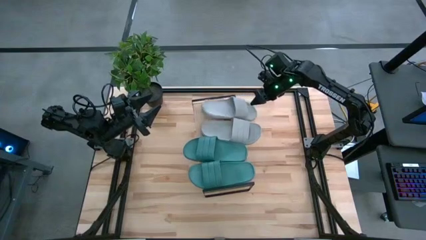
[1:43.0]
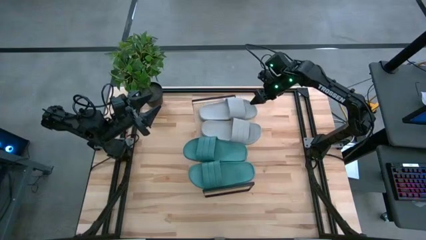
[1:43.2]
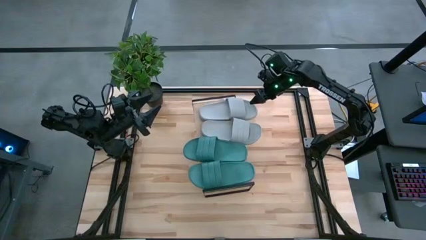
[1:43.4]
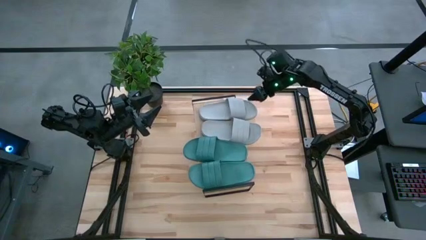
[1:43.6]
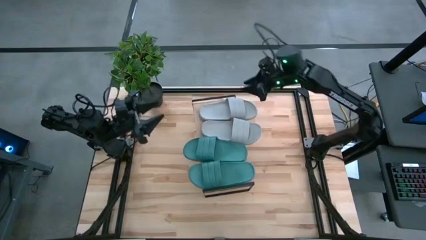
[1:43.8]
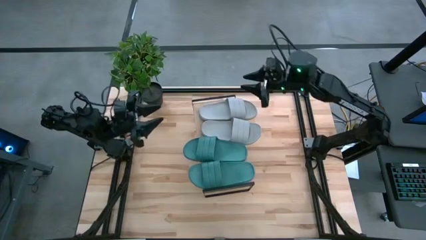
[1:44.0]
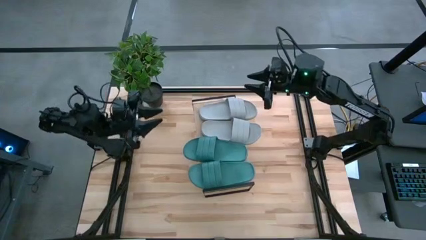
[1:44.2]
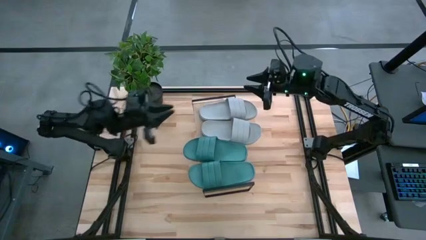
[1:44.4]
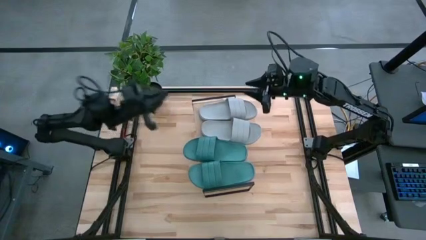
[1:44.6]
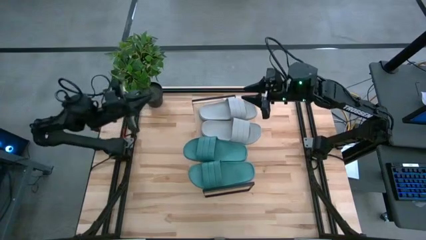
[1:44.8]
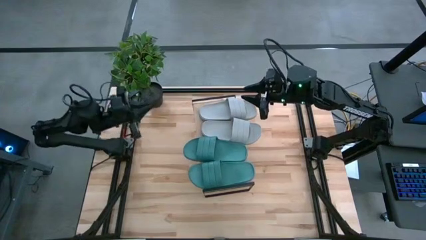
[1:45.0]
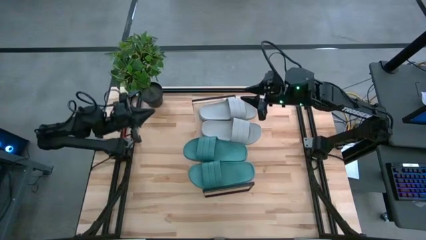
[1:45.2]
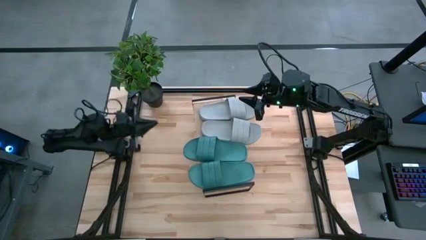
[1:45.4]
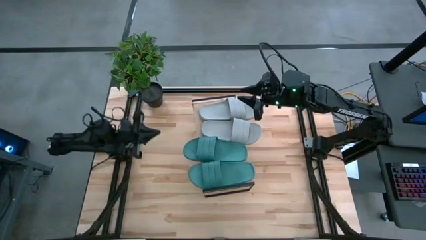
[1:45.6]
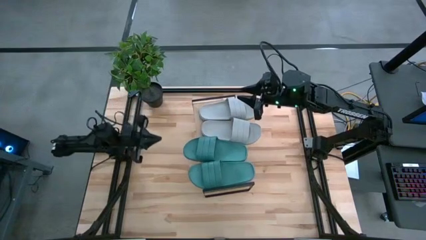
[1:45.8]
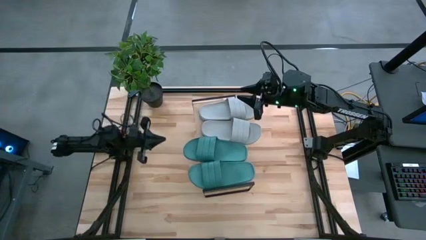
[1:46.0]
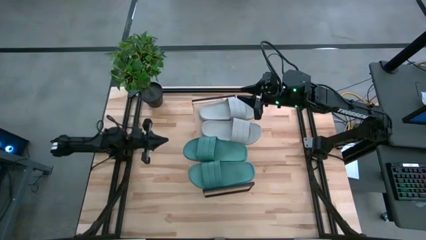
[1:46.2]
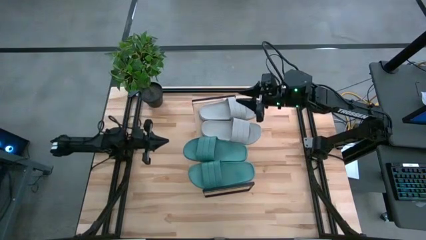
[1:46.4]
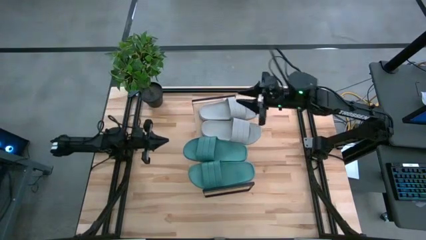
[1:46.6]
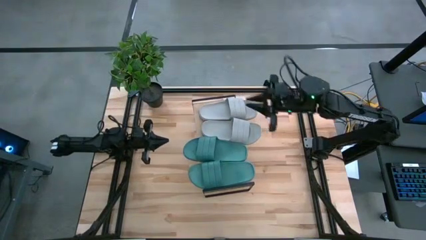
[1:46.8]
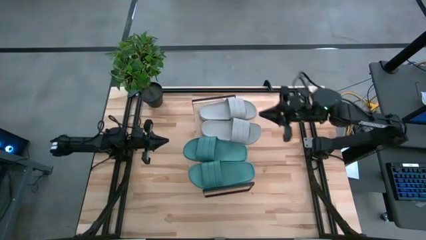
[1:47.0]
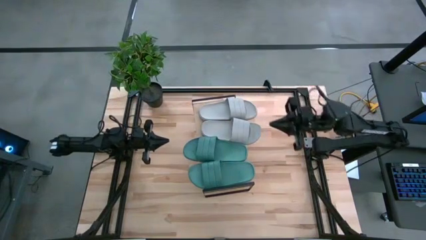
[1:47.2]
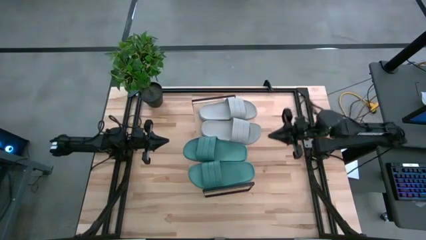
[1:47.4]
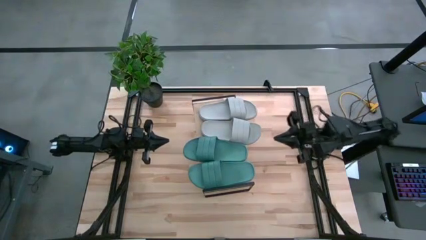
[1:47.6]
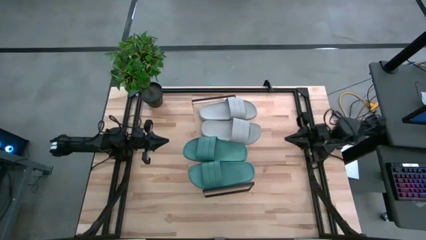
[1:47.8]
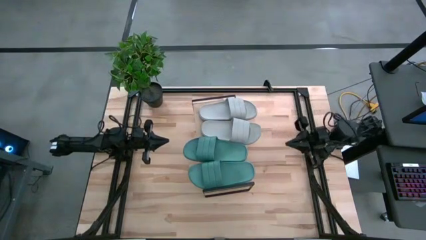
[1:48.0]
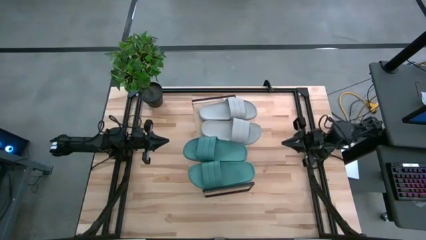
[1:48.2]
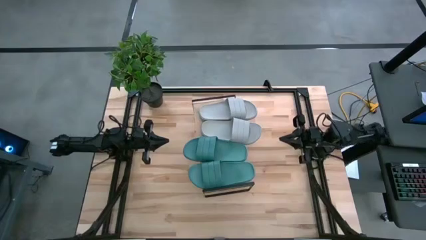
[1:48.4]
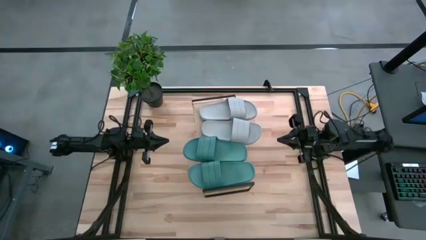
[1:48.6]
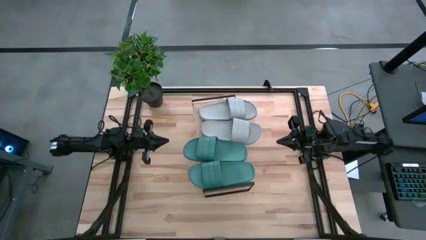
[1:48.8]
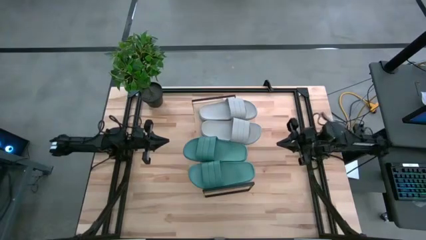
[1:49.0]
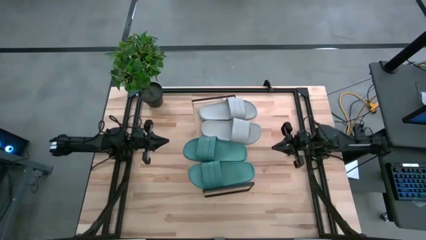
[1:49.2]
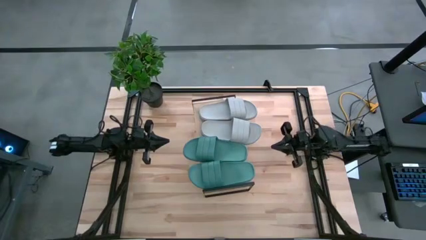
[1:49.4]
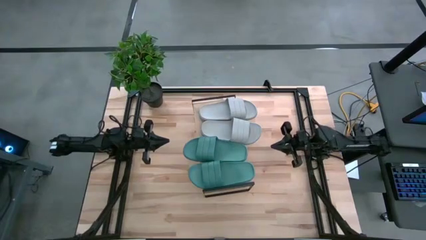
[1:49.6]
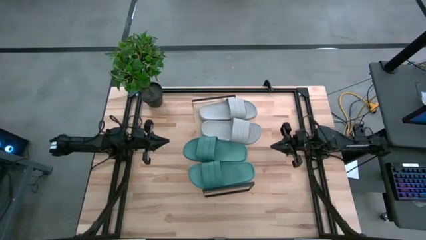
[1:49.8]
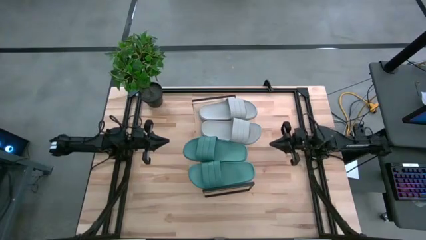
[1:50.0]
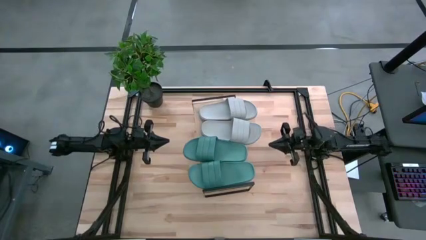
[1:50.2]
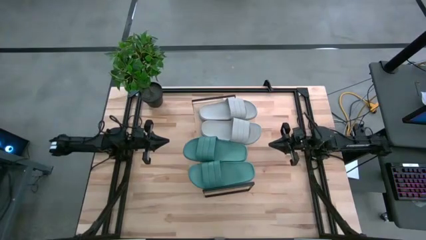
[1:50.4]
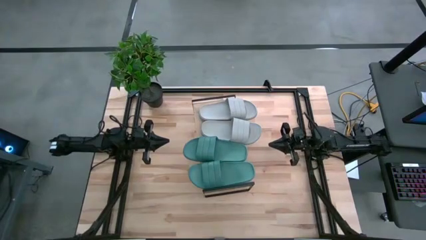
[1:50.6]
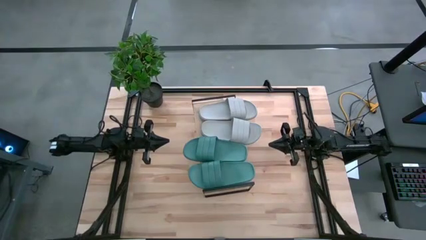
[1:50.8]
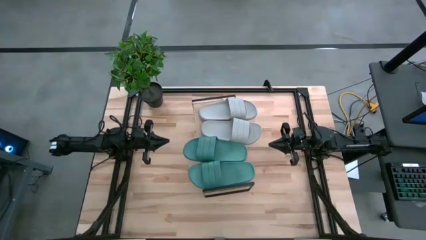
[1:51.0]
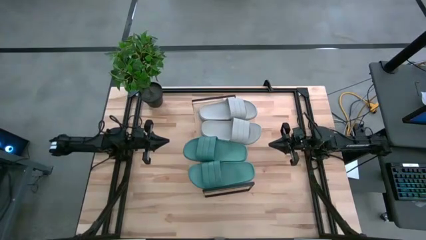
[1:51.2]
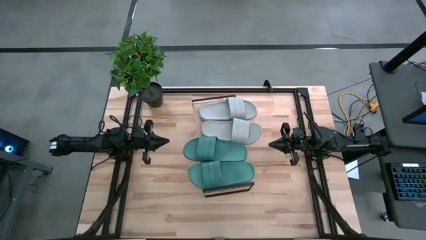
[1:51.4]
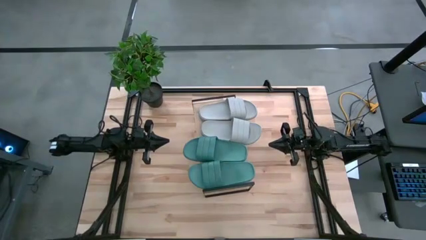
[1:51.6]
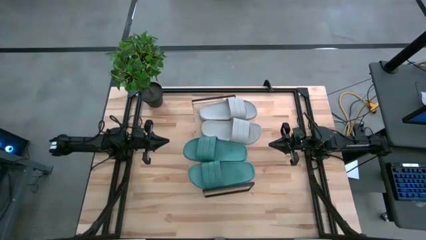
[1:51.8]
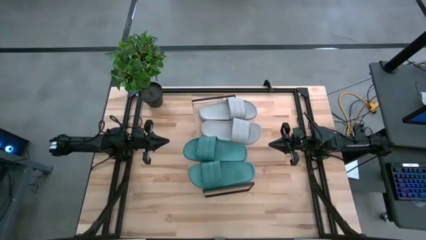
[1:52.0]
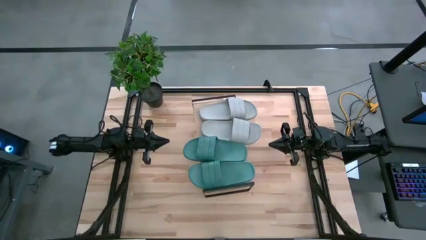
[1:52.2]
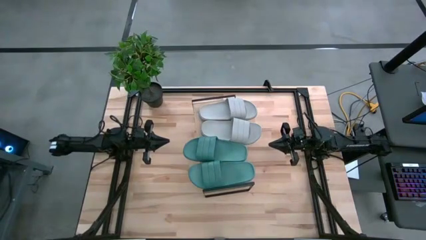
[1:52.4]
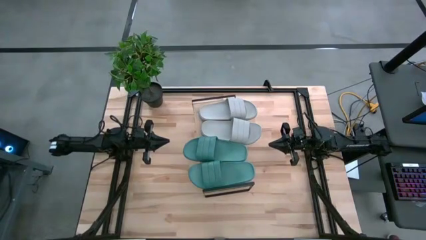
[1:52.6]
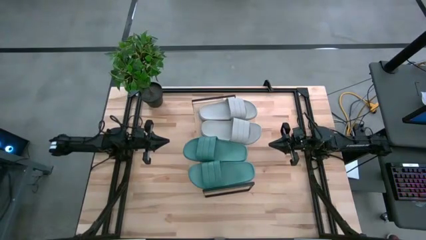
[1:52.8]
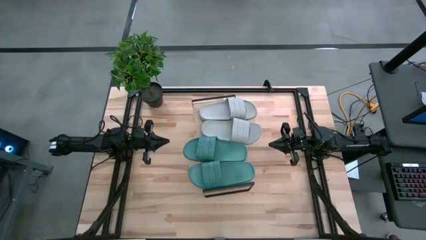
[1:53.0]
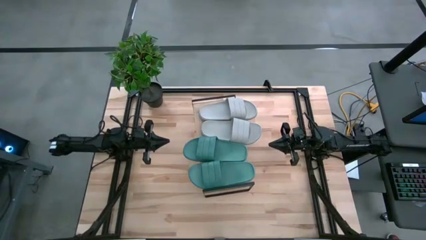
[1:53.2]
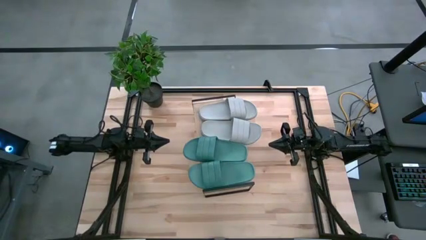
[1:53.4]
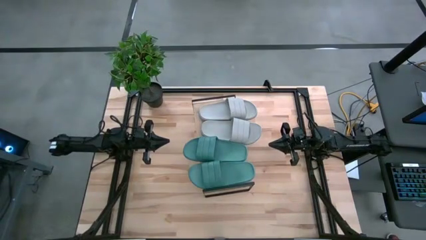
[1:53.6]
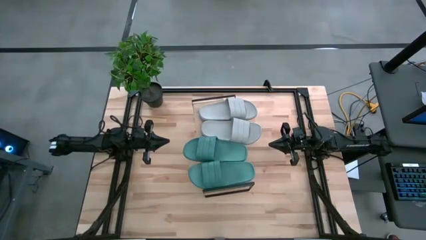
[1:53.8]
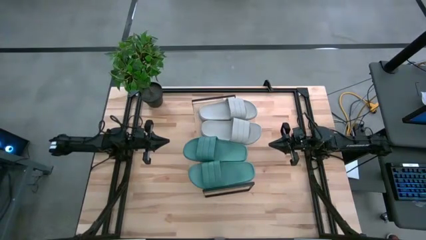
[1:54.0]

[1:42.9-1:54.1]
Task: Pick and place slides into the shelf
Return to Home Position

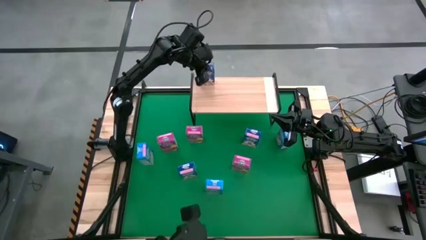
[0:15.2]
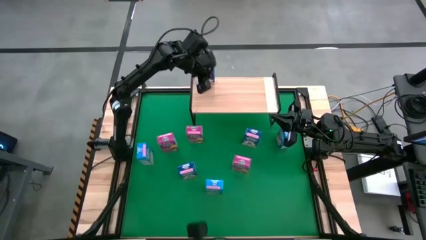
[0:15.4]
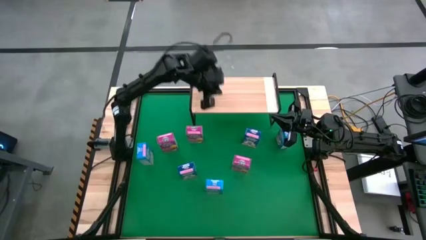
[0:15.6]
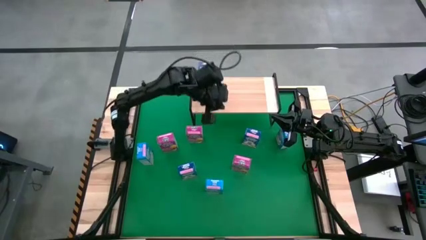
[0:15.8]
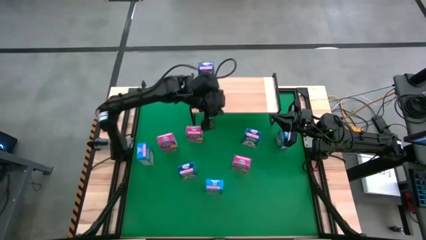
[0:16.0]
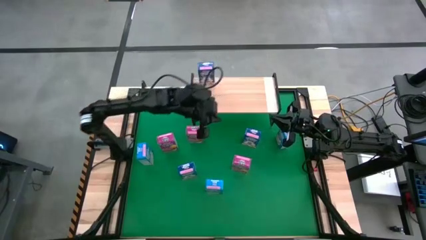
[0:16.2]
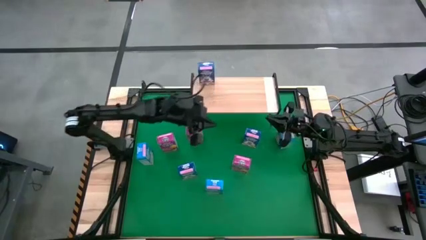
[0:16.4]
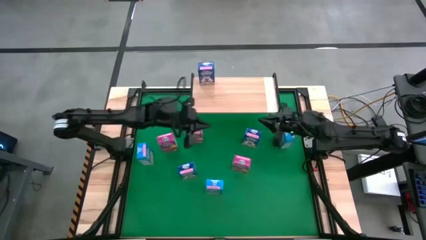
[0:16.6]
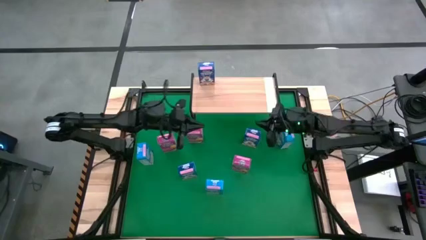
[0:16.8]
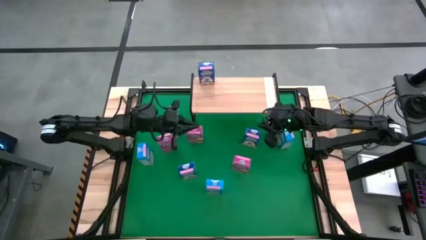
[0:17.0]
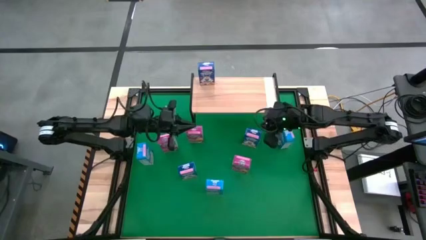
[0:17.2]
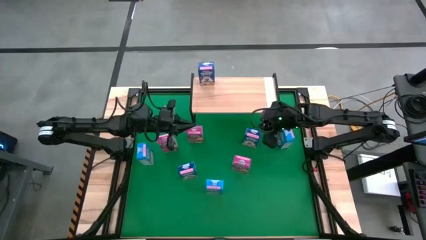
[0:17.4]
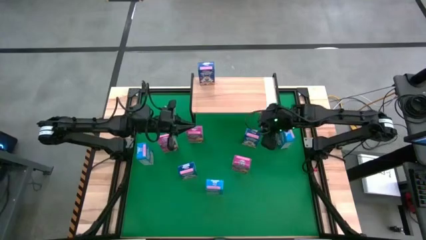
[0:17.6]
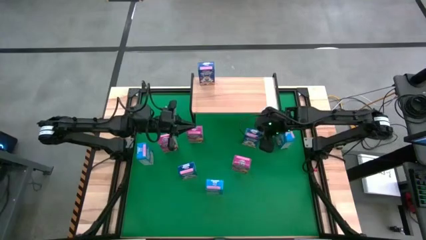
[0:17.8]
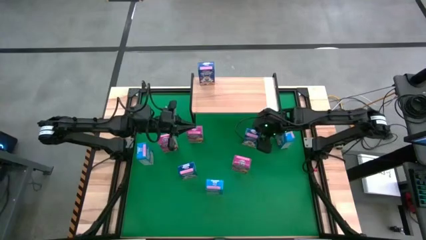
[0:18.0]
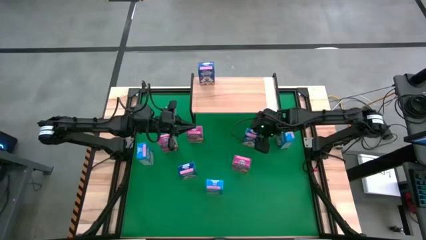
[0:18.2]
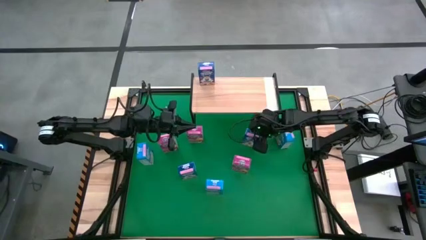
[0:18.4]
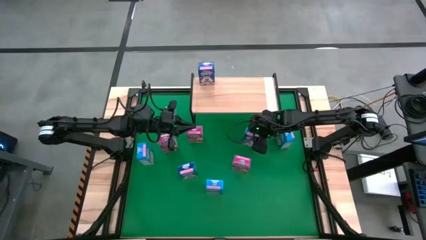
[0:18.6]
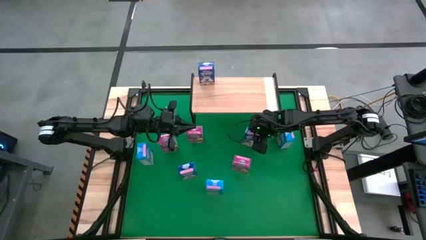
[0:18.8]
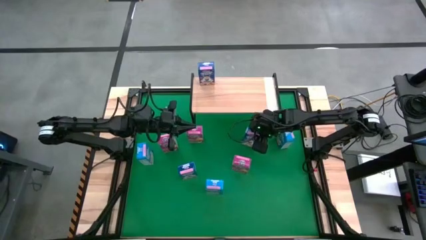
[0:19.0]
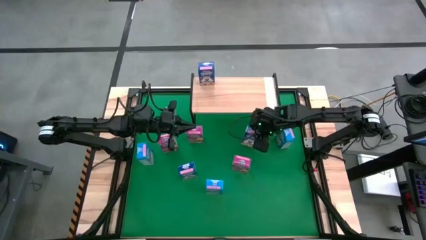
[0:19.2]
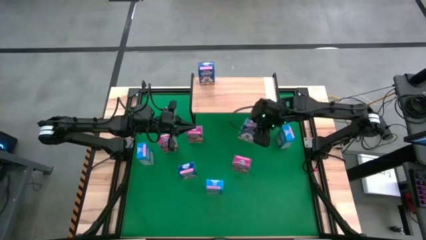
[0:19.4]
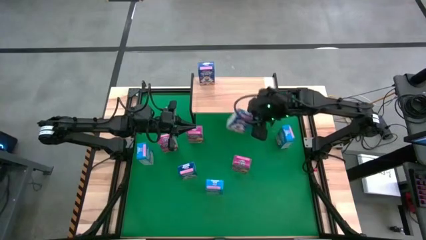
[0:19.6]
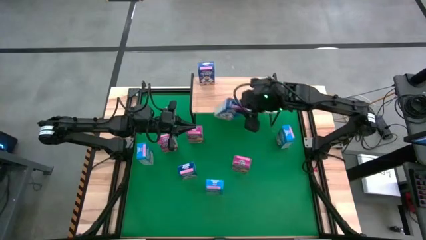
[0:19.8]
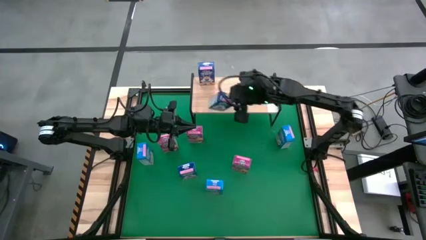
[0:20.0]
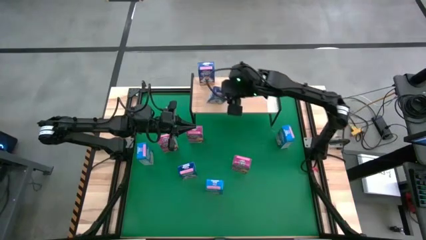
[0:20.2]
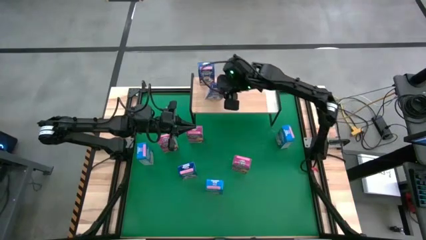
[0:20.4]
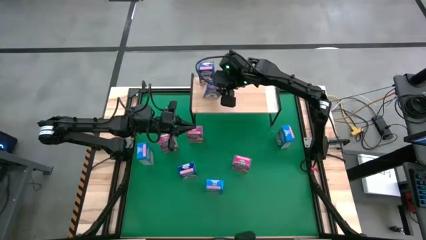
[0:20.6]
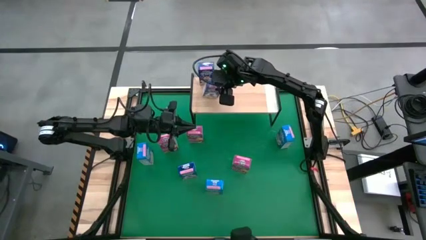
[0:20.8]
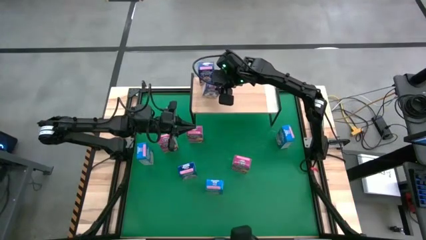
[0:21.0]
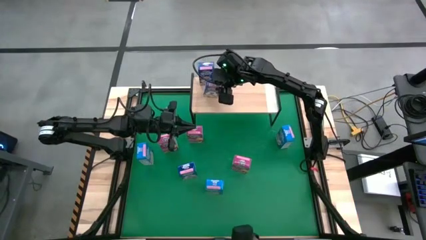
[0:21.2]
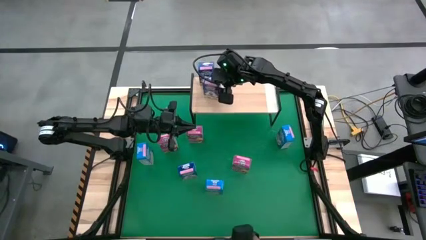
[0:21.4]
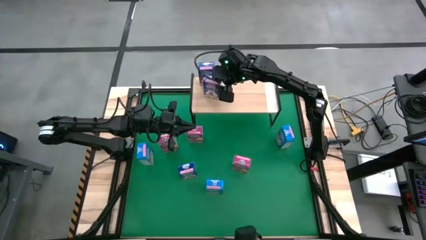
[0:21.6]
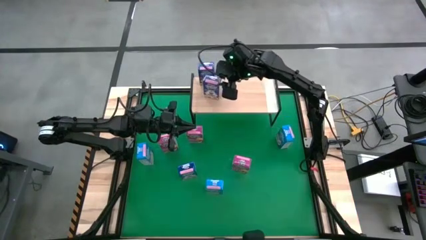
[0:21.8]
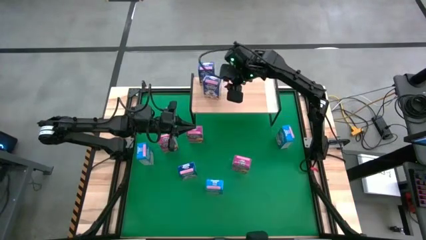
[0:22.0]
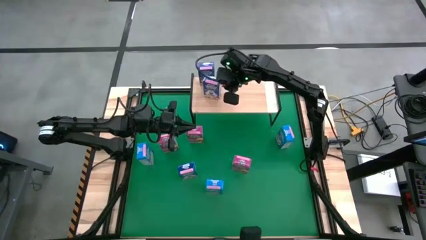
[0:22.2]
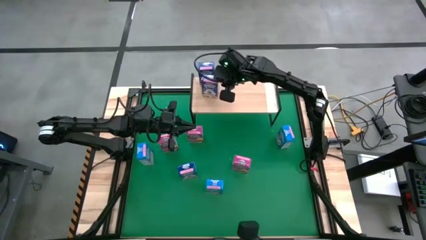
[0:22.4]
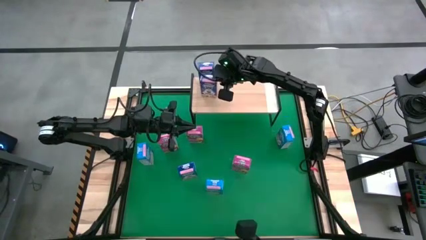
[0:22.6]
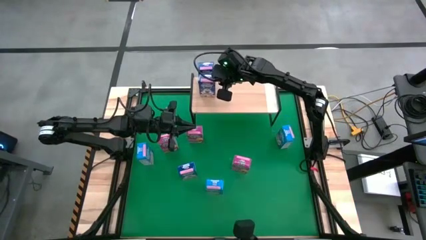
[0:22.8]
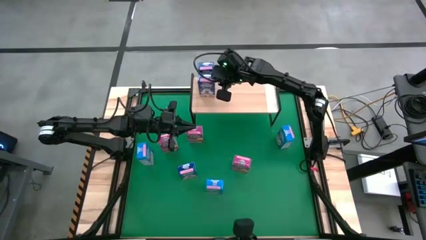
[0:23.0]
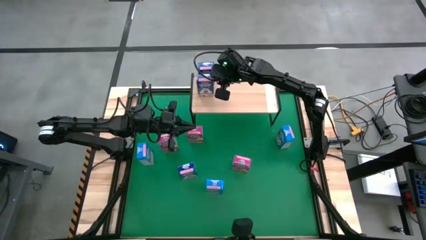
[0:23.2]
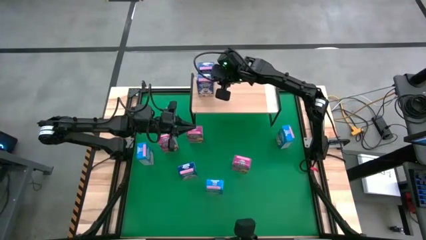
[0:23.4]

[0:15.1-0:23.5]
Task: Stack cereal on shelf
Put the right blue cereal box on the shelf aligned with the other blue cereal box
